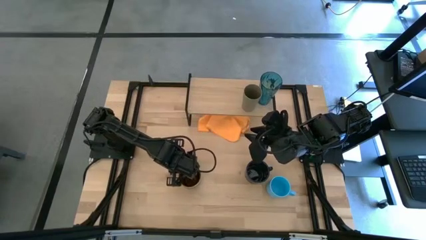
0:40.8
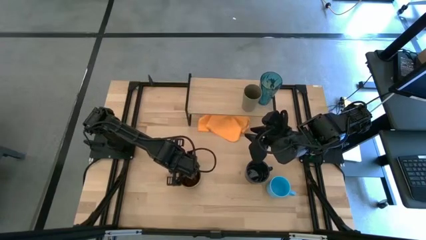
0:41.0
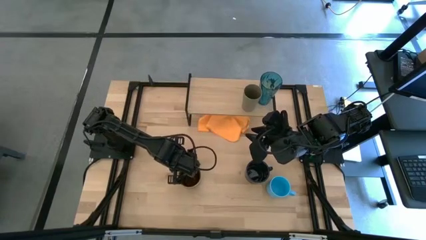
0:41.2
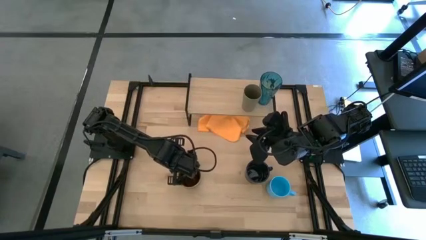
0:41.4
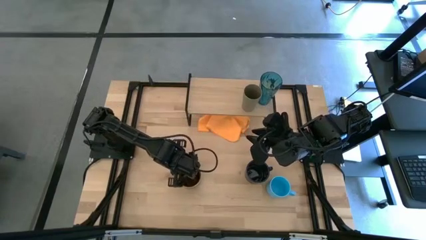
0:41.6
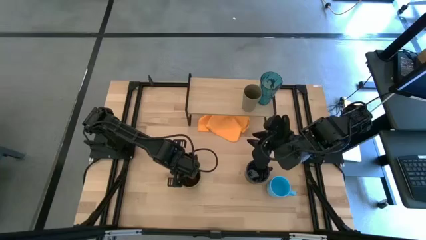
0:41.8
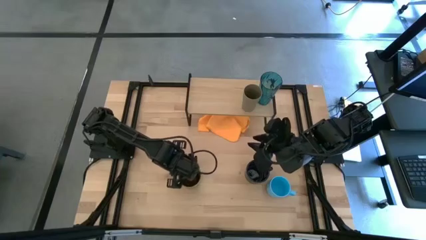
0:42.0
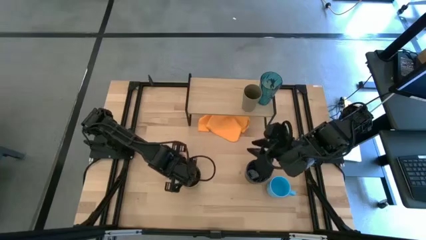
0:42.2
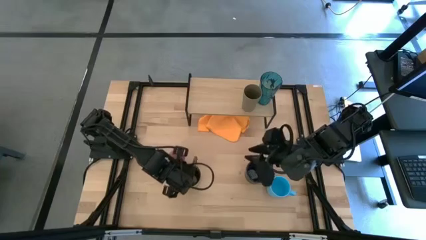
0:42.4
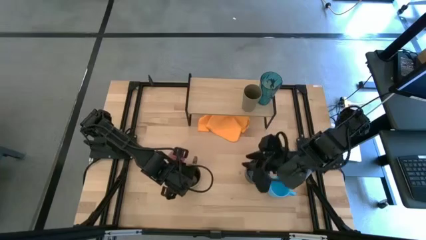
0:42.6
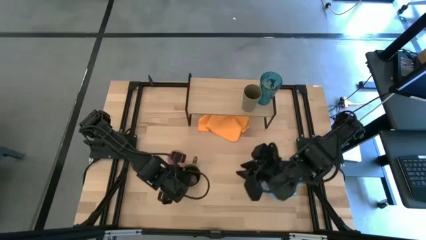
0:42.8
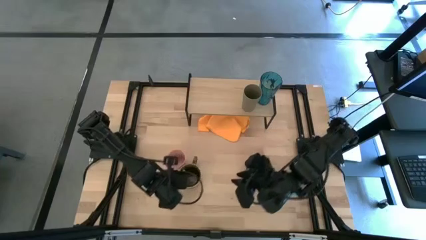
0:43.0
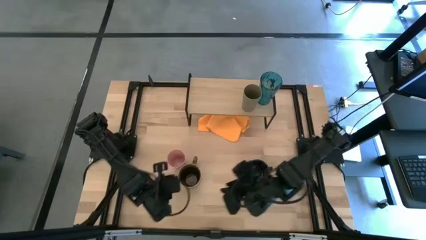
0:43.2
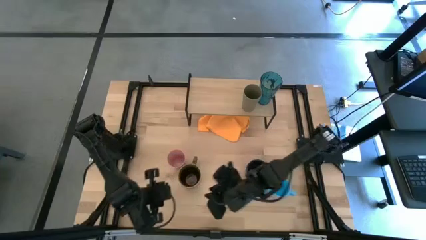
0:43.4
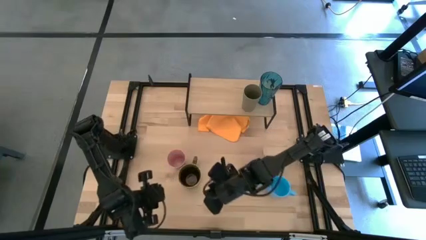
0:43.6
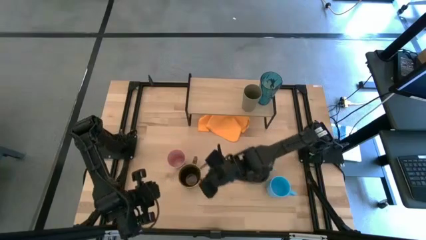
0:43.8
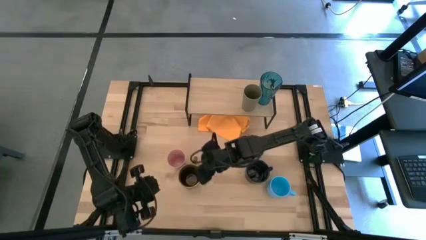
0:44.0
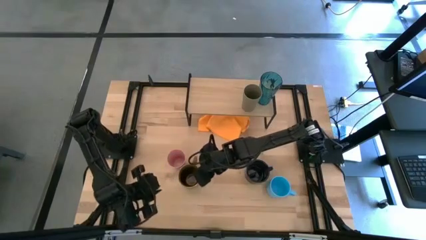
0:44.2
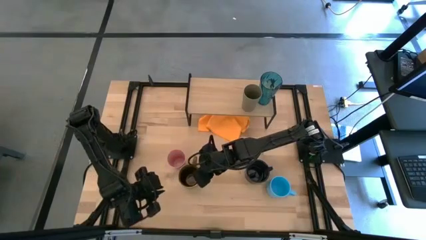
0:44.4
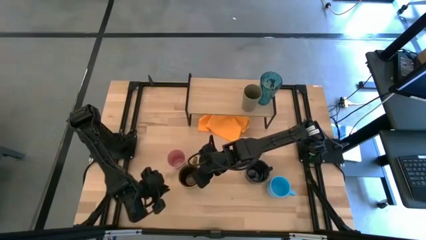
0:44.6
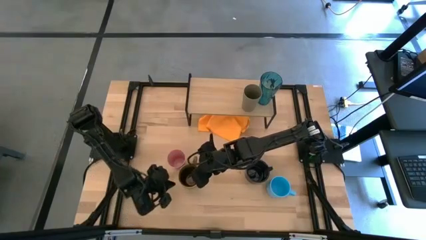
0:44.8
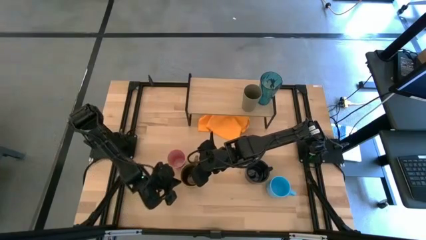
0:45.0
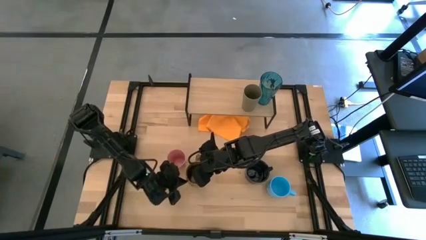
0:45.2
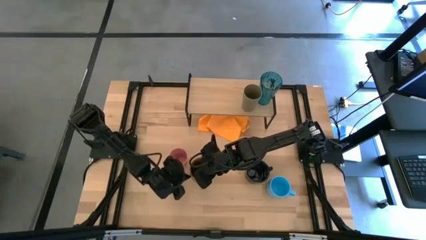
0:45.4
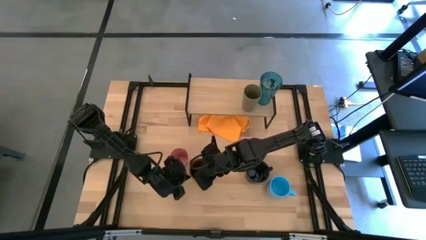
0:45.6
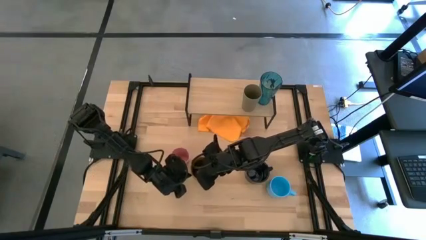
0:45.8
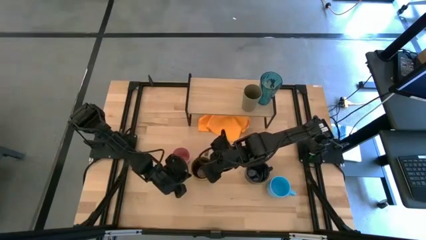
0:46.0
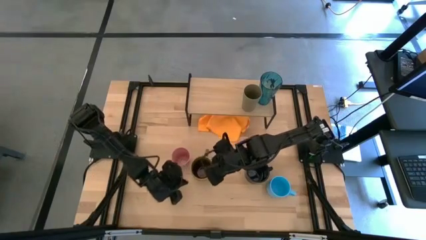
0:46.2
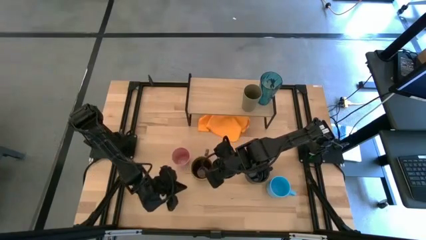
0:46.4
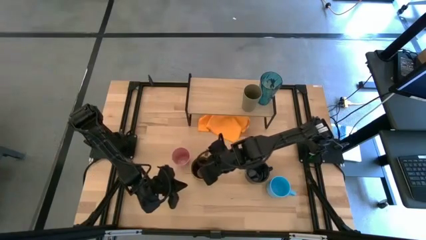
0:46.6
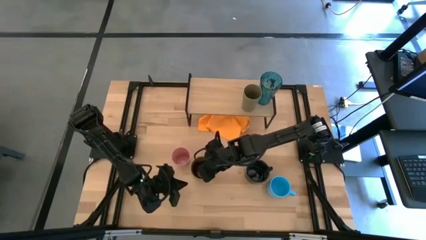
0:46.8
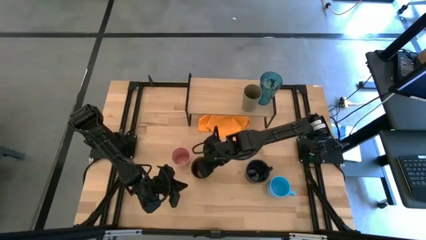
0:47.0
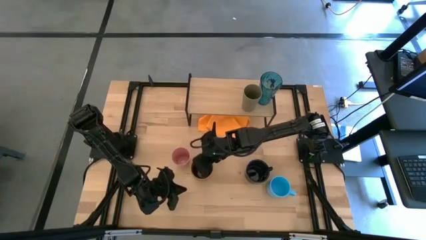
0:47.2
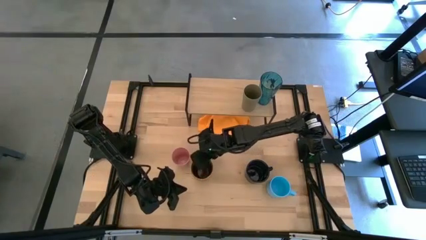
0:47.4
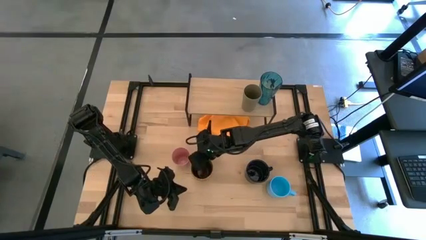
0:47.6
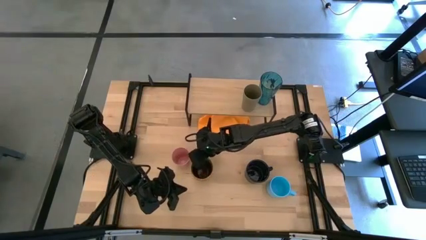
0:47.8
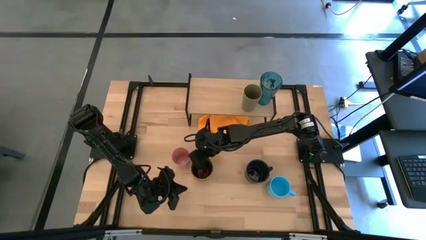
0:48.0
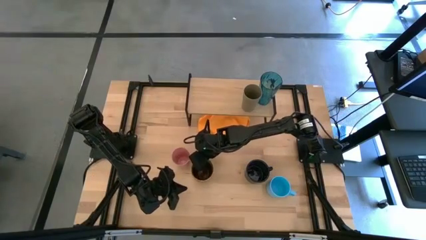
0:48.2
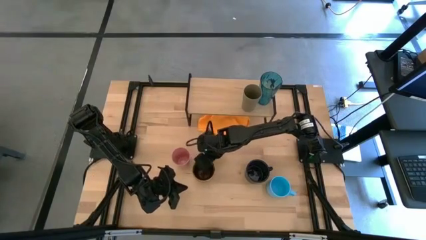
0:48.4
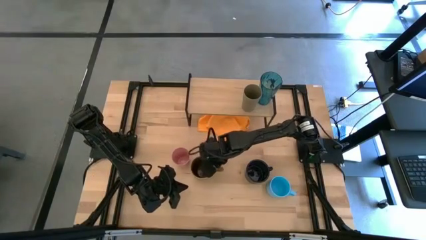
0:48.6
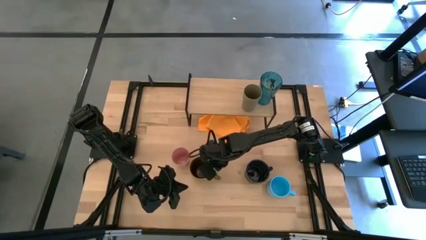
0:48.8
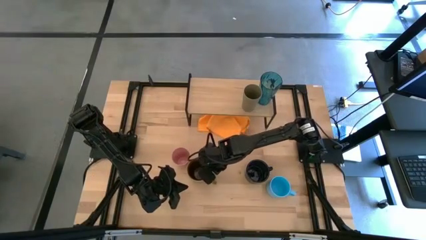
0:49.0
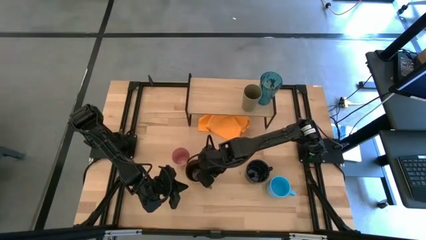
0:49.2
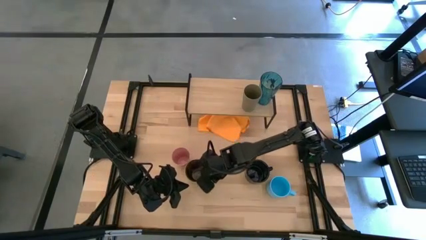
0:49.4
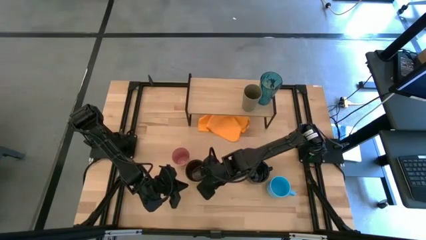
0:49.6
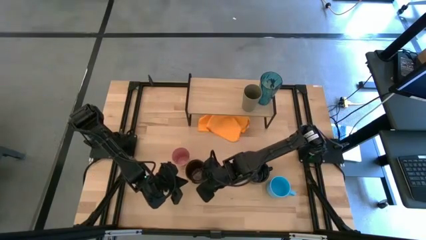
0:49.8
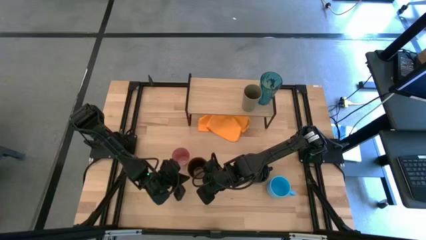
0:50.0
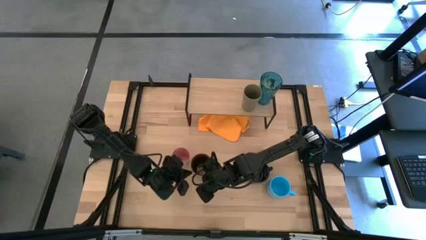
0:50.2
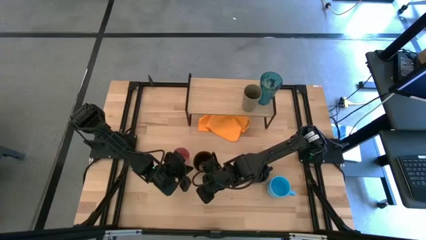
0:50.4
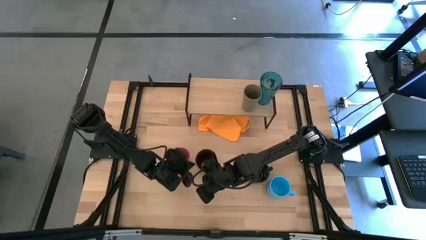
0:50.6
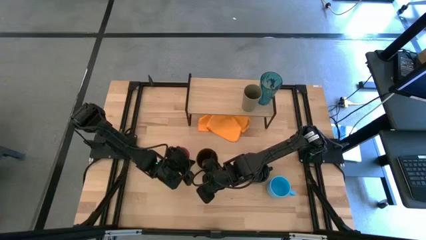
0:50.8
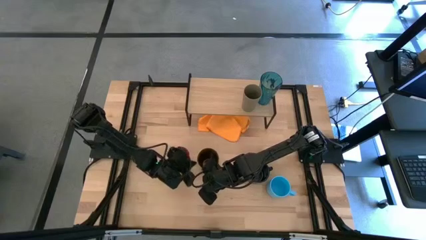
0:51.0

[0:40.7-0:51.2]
Task: Stack small to large cups/mugs on shelf
Adjust the brown mug

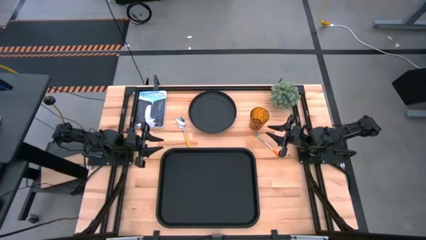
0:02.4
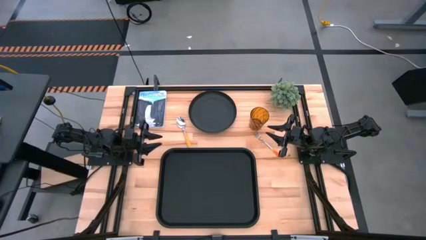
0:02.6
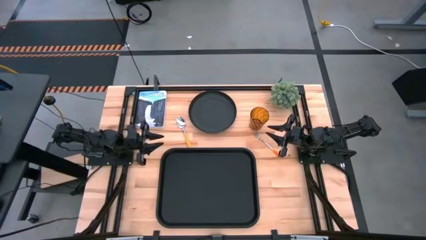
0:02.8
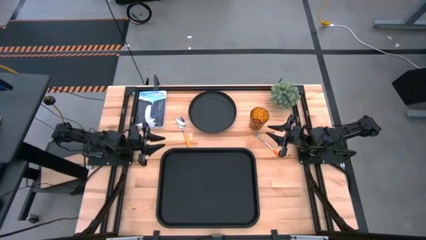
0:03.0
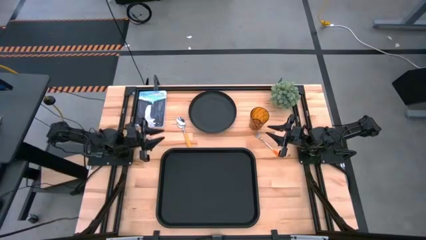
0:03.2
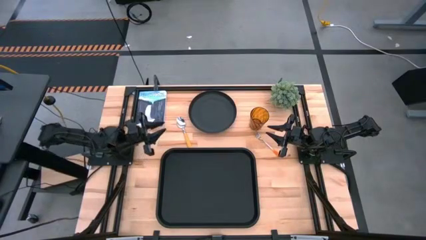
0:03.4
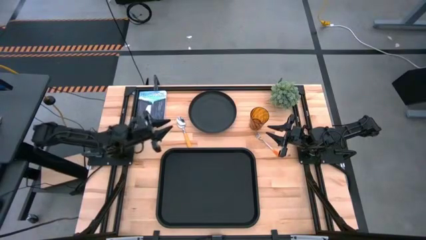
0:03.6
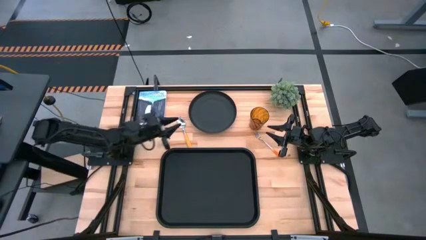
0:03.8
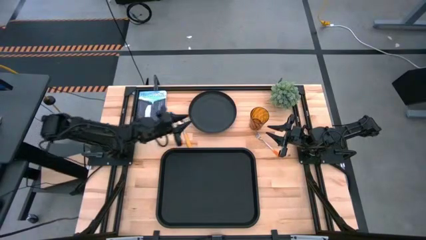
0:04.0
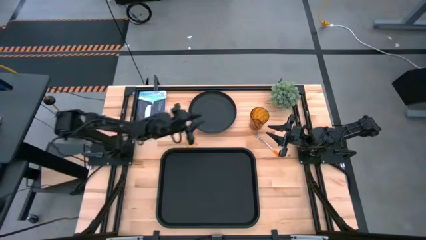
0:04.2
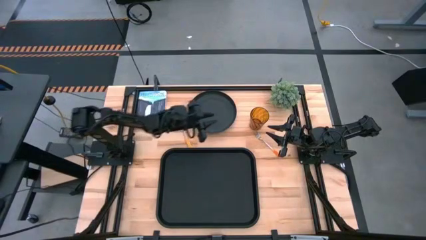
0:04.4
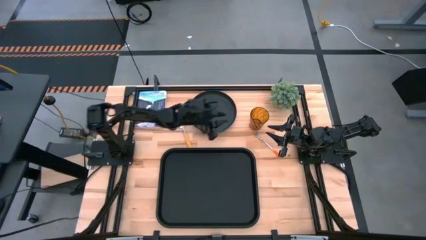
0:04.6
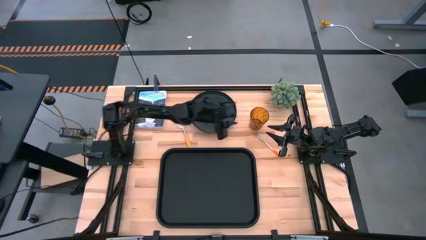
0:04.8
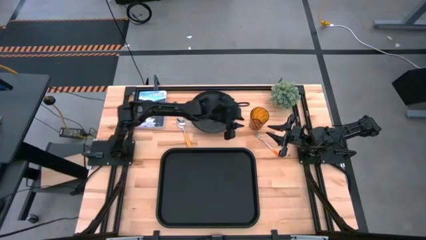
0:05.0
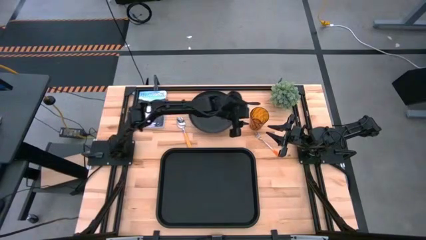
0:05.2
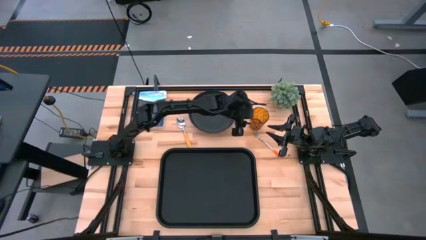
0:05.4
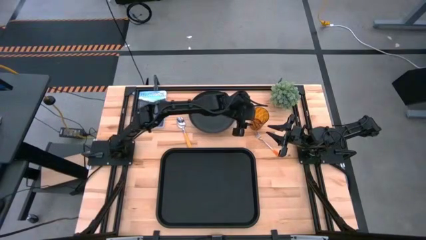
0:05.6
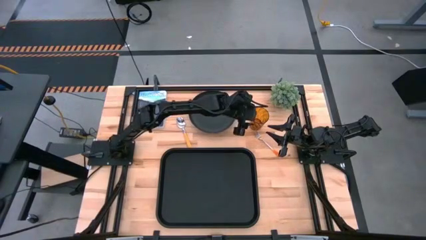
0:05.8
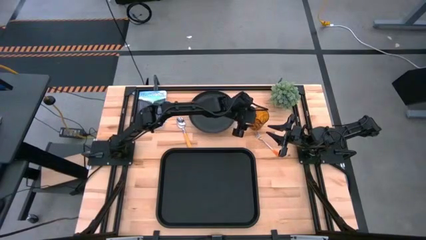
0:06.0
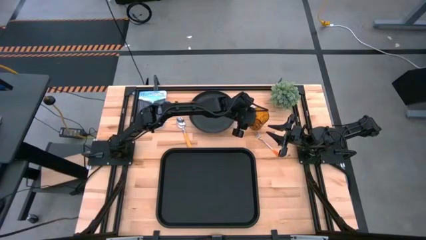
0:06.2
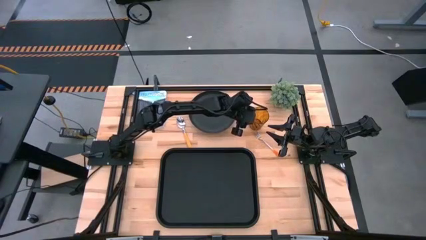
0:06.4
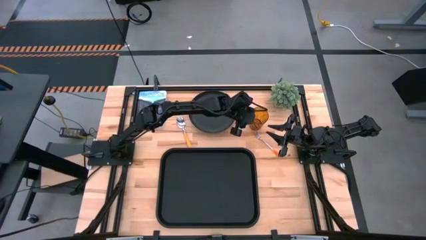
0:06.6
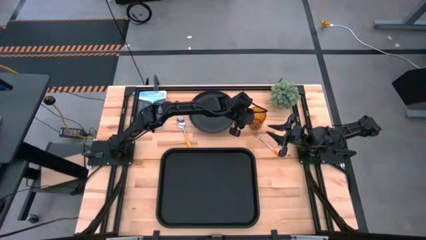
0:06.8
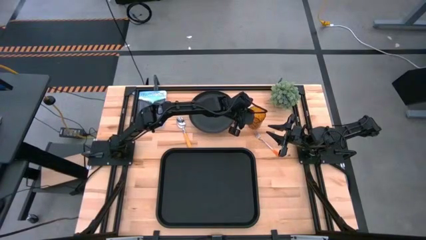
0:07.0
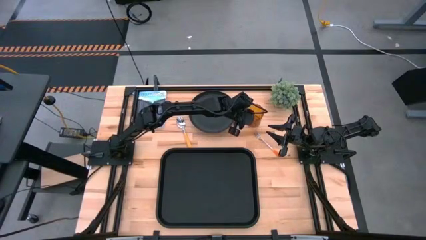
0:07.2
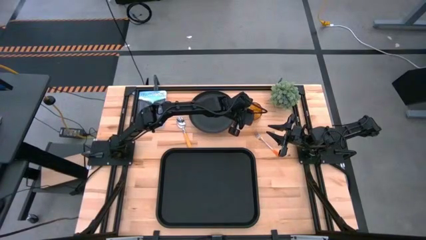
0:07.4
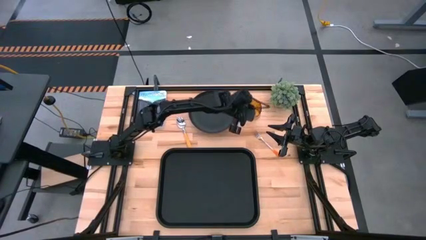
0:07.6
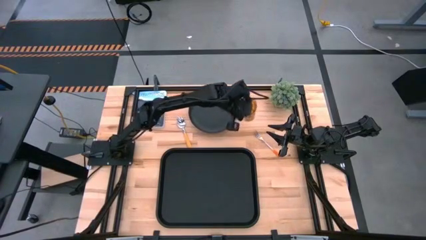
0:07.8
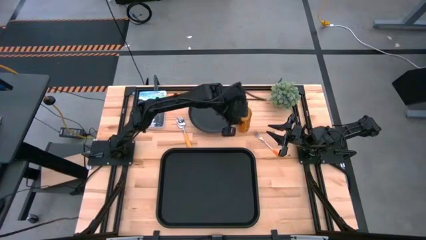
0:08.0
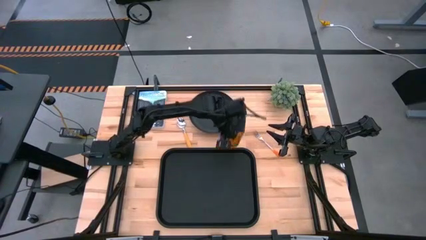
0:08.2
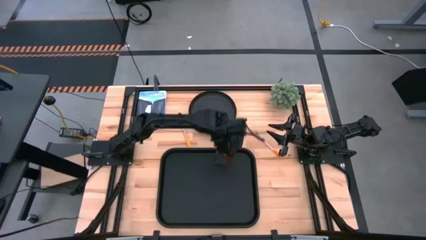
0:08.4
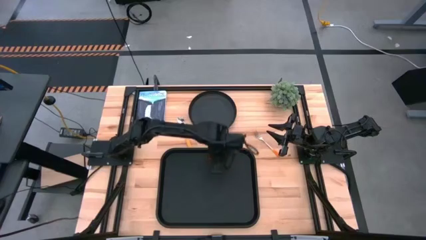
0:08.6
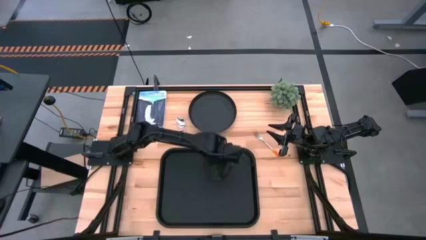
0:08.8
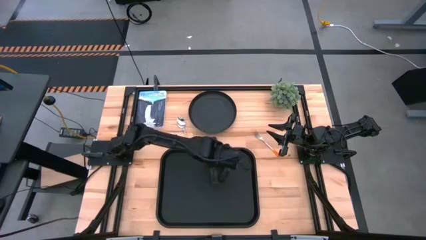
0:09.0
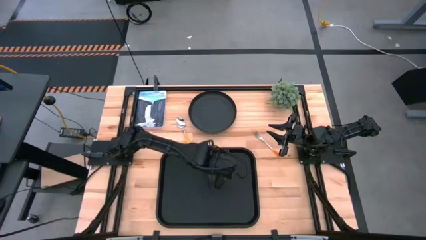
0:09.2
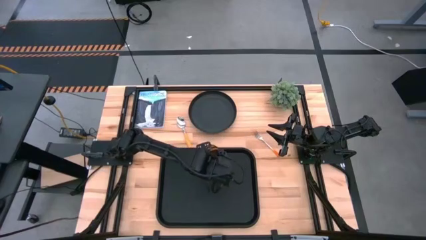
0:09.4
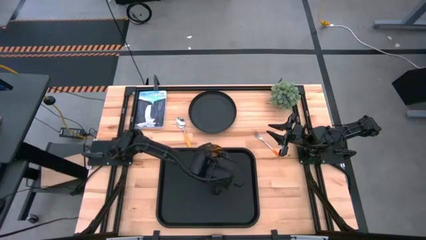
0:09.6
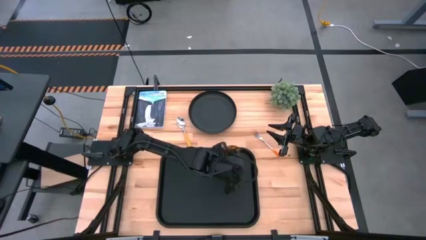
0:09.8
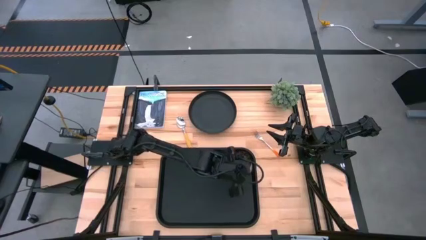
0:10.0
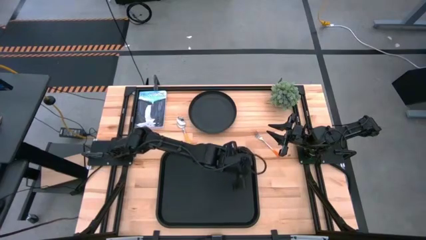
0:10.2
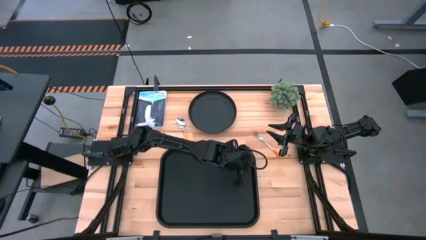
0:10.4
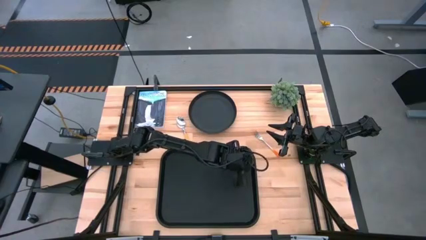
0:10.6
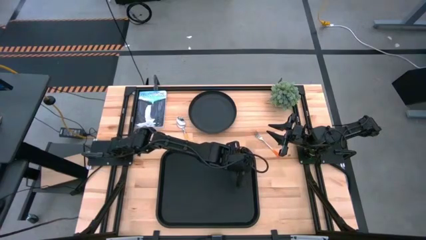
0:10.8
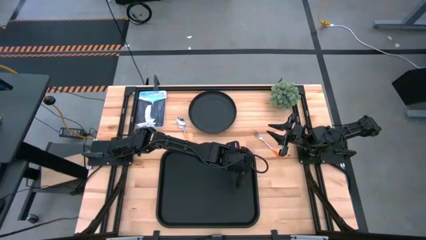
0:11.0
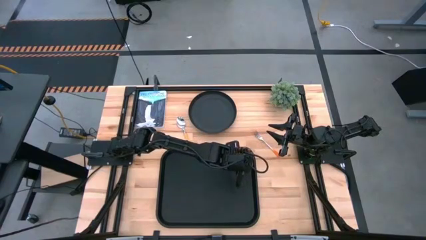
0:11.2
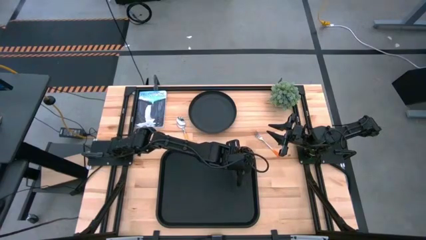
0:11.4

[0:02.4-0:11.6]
Task: Pick and place plate/cup/fork/spoon on tray
Put the orange cup on the black serving tray
